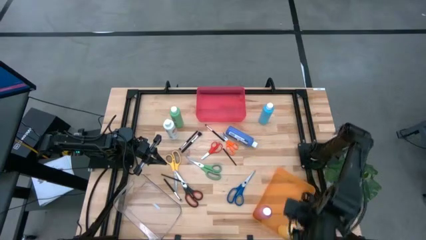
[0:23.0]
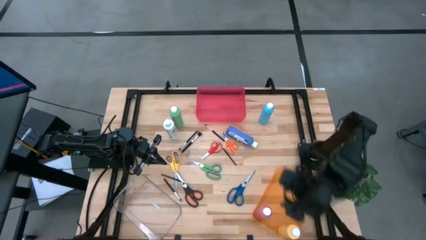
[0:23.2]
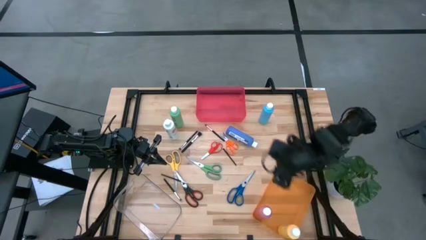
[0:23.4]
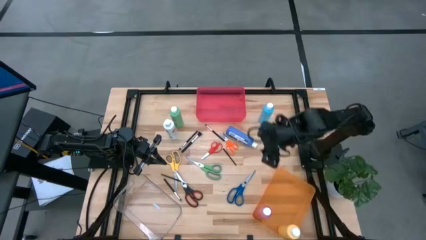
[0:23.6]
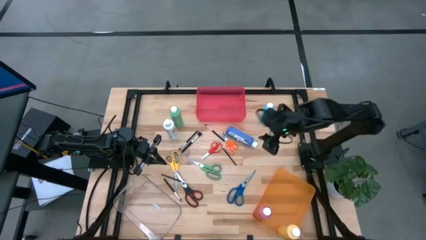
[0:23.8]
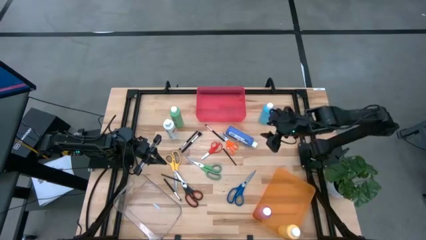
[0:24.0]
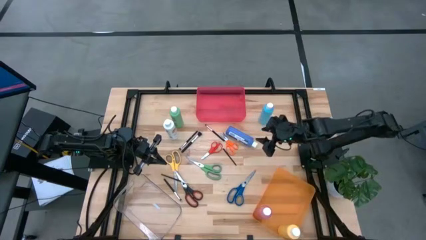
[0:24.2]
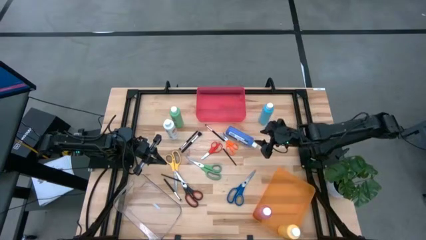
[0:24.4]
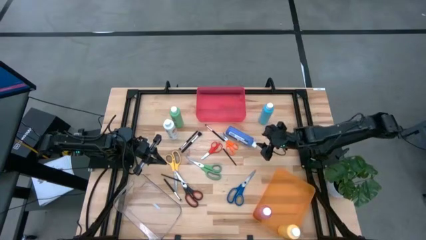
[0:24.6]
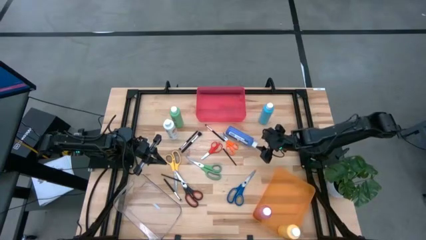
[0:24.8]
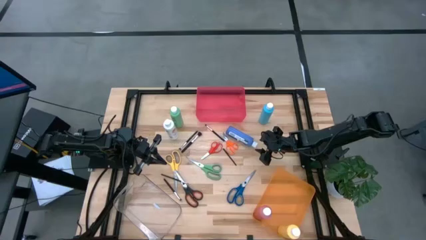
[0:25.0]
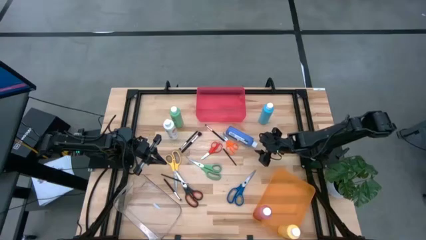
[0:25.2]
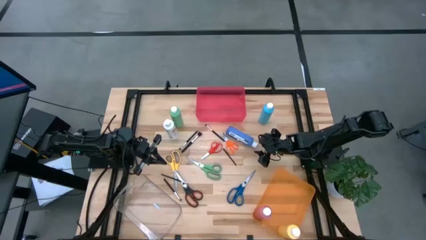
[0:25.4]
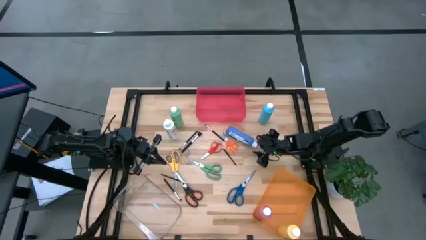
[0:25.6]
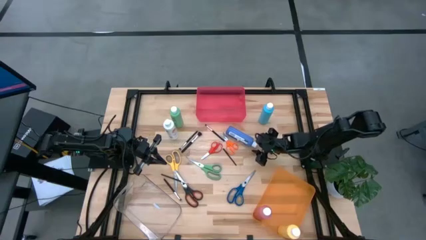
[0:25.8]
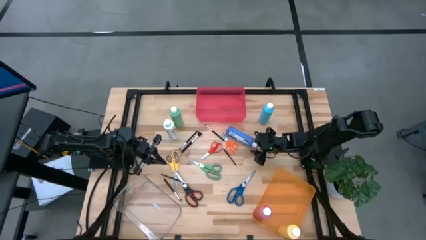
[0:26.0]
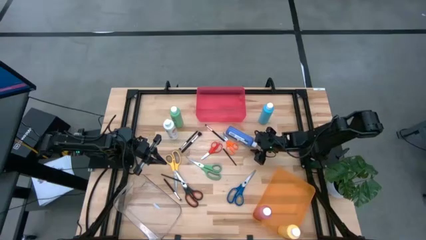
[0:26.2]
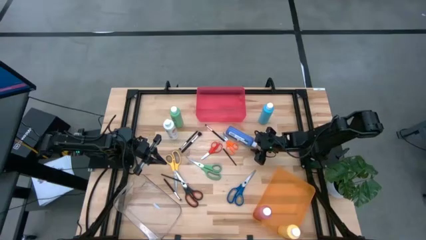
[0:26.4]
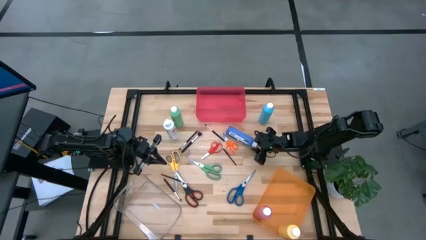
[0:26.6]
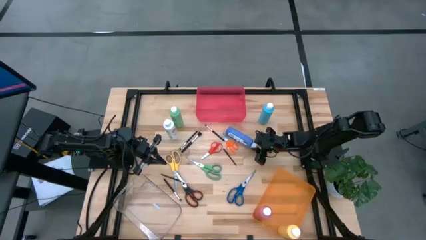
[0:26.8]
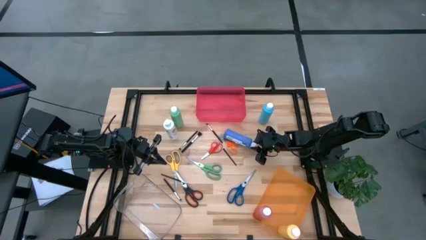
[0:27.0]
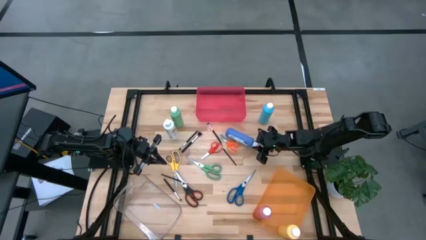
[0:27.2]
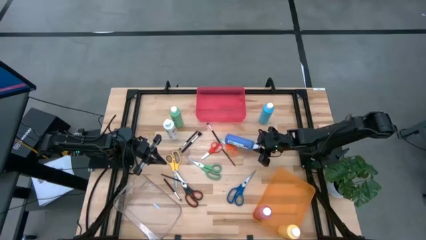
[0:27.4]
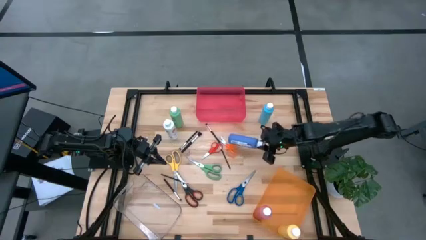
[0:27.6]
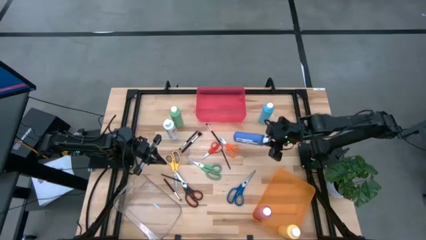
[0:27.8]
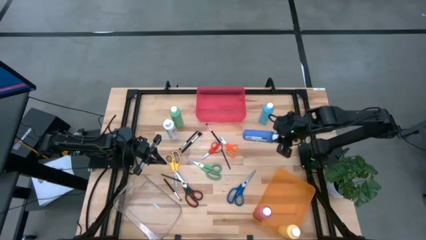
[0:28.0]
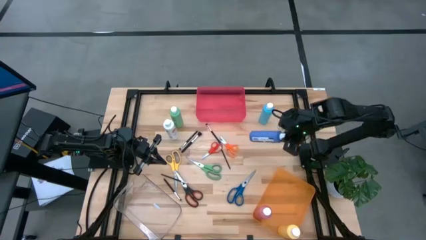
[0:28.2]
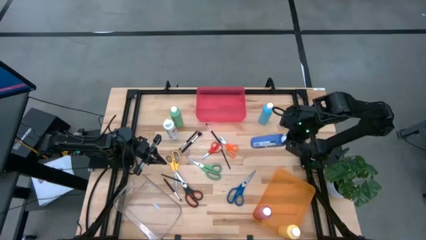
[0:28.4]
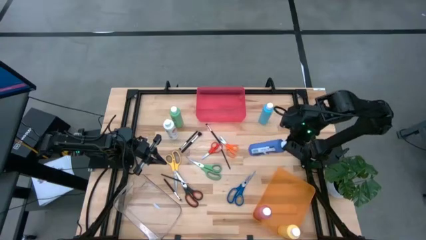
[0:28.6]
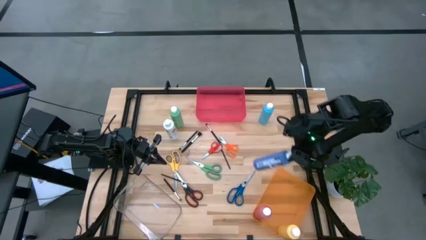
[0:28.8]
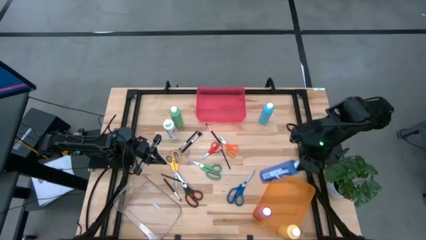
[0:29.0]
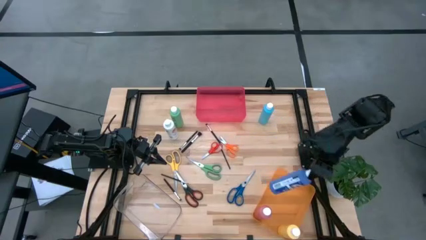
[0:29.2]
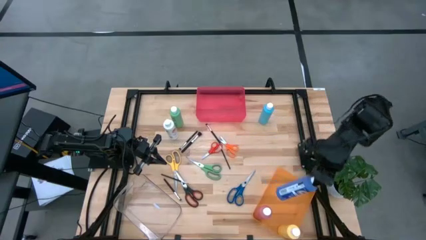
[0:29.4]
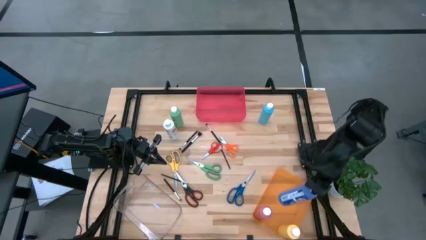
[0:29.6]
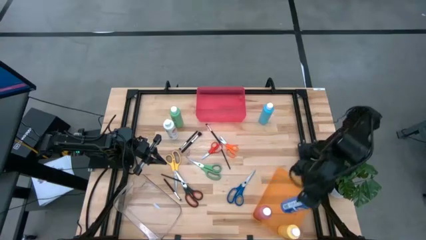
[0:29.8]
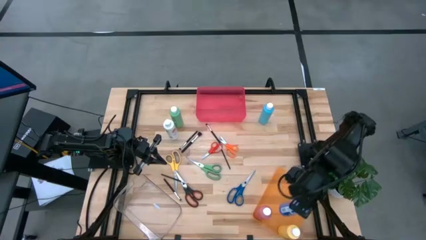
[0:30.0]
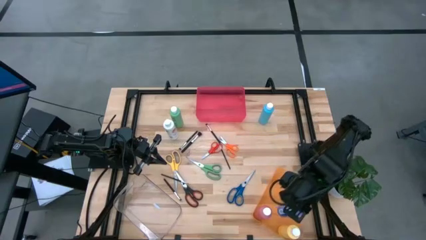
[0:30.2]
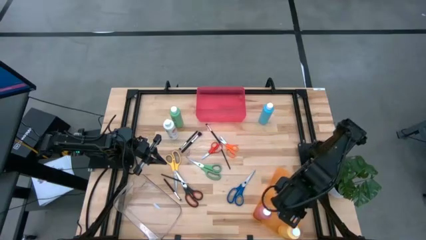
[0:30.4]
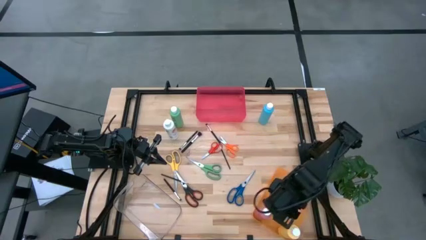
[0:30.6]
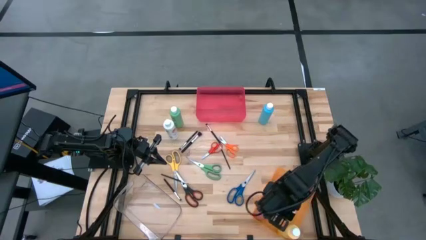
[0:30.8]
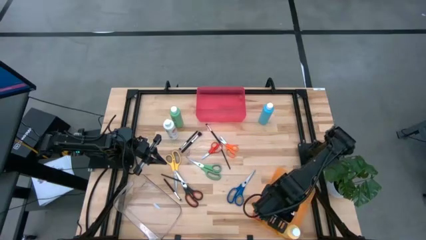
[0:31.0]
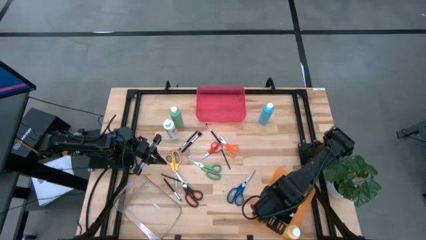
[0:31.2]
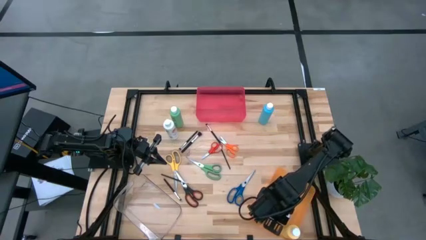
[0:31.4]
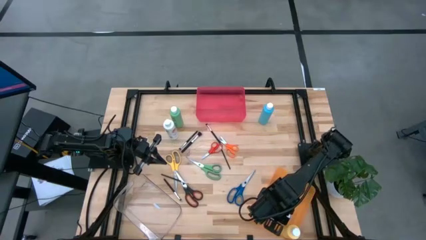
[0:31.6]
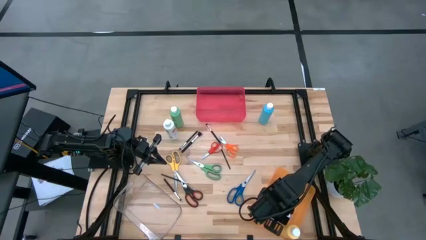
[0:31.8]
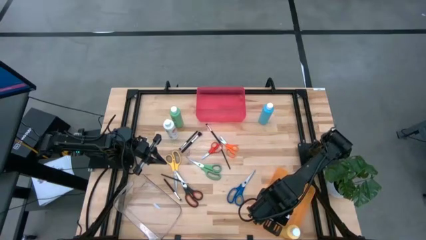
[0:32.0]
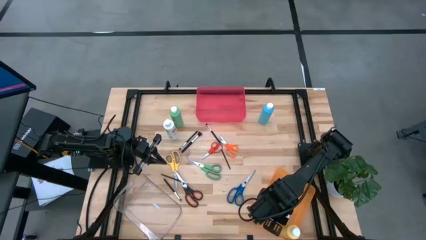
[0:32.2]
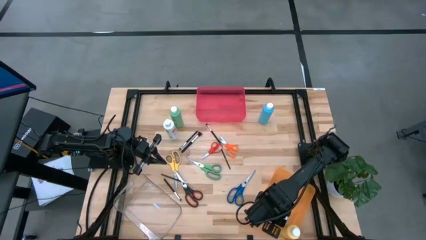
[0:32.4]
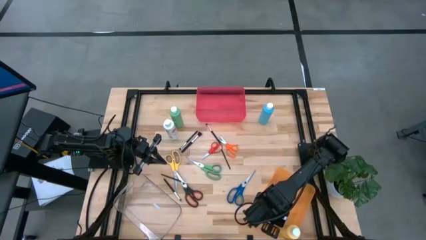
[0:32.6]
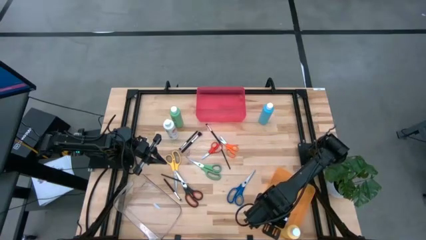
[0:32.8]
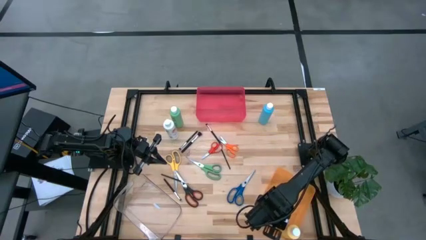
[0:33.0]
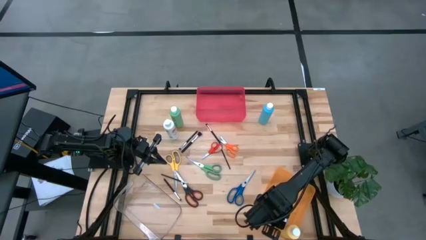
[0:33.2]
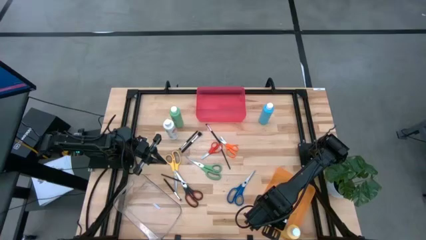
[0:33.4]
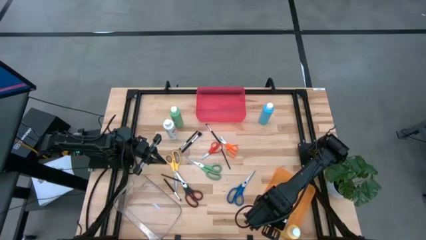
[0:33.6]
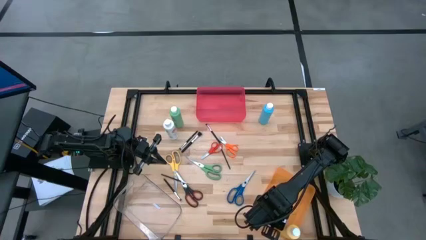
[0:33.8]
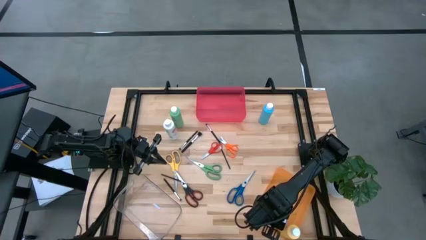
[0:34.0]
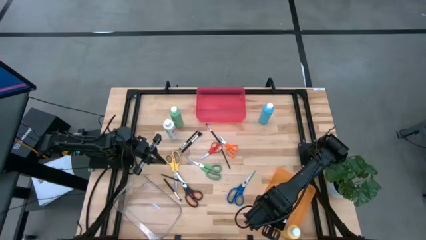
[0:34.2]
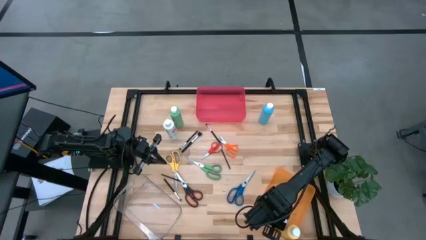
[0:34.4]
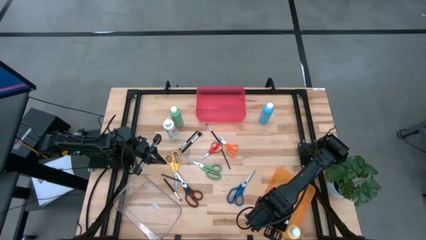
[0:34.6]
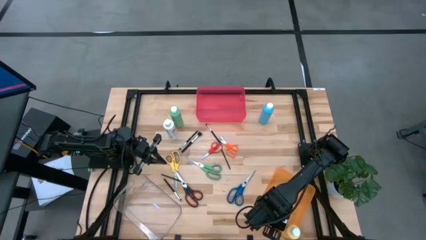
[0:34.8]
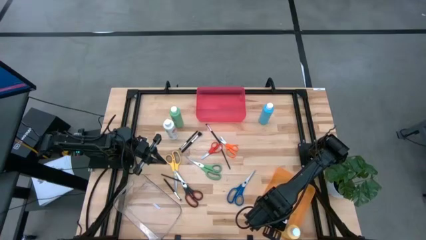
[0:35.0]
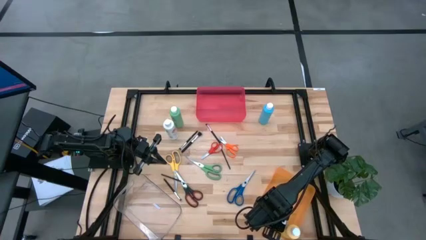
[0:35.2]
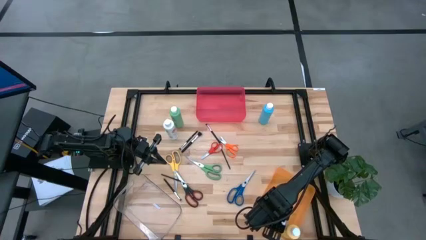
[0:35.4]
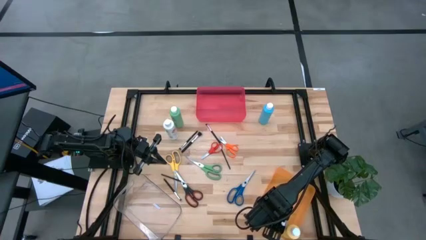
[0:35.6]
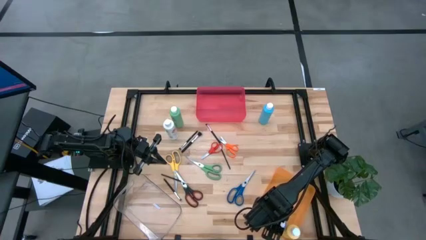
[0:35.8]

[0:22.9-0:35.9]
Task: Pick & Place Paint Supplies
Put the blue paint bottle into the orange bin

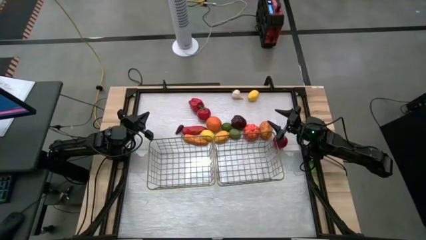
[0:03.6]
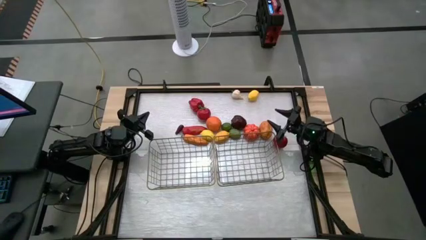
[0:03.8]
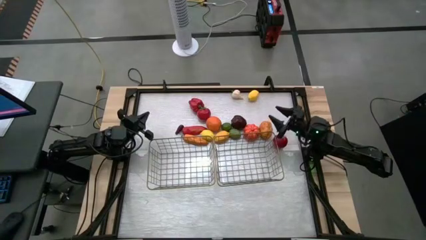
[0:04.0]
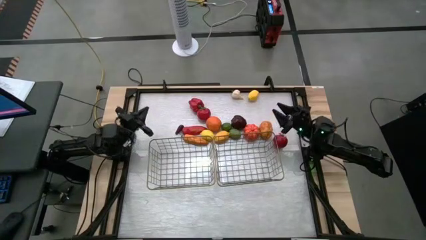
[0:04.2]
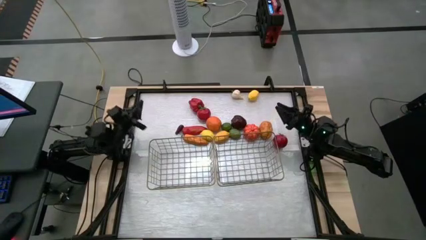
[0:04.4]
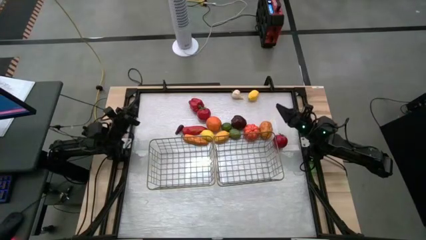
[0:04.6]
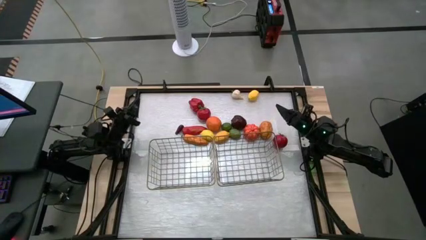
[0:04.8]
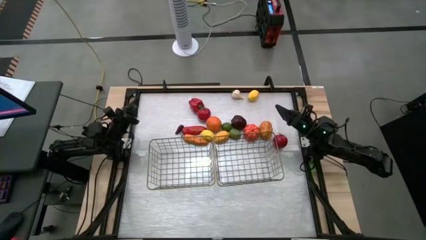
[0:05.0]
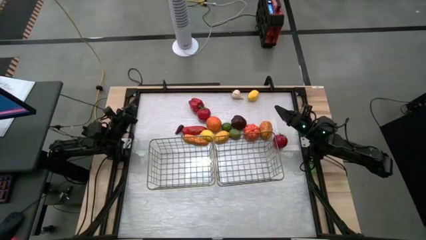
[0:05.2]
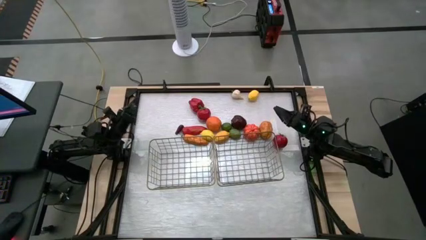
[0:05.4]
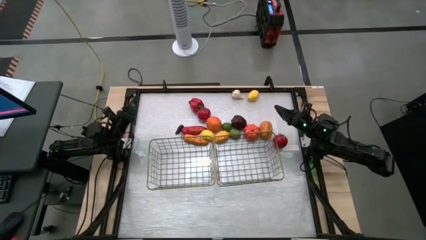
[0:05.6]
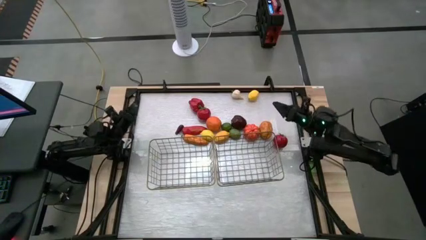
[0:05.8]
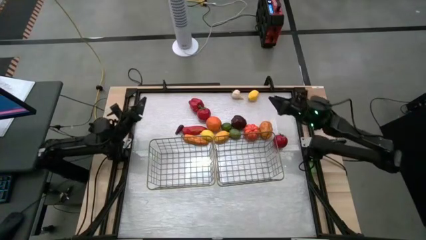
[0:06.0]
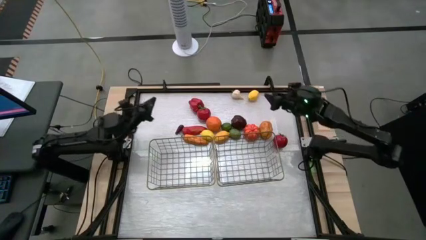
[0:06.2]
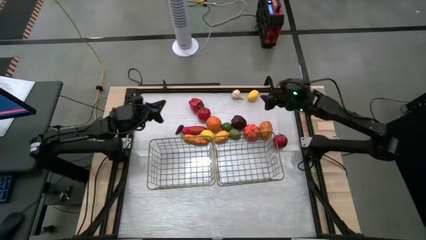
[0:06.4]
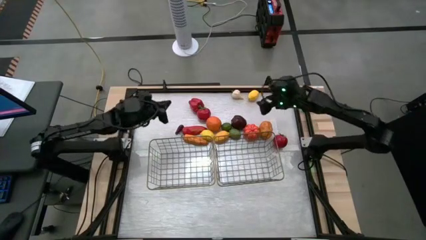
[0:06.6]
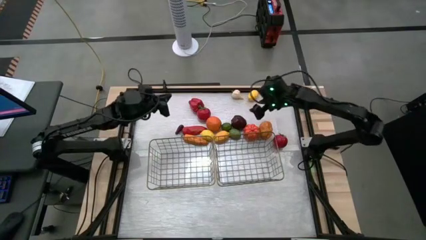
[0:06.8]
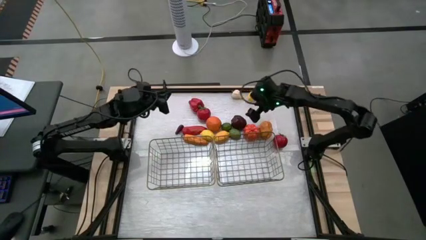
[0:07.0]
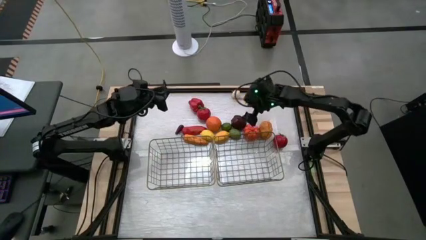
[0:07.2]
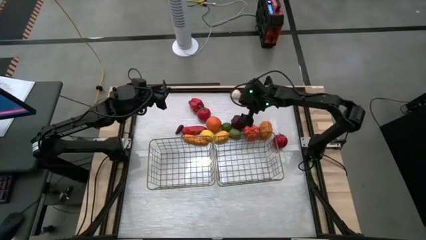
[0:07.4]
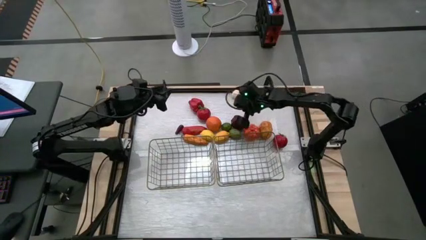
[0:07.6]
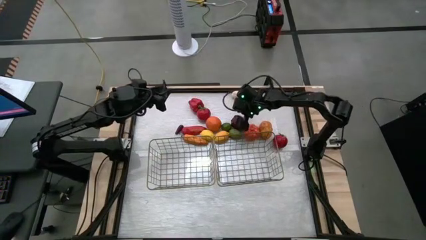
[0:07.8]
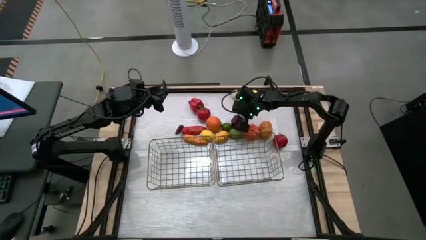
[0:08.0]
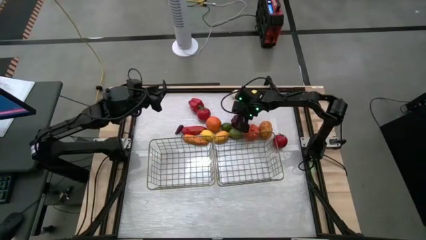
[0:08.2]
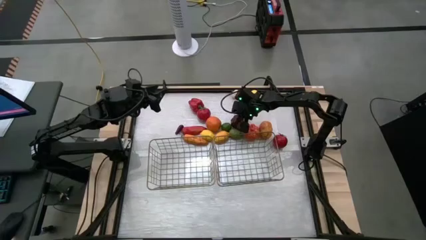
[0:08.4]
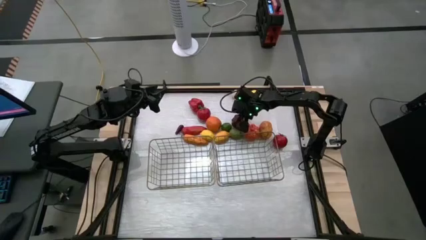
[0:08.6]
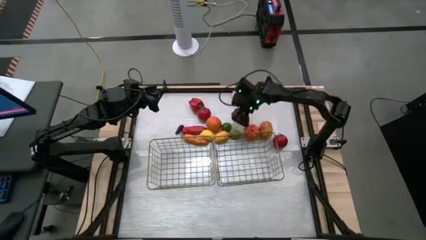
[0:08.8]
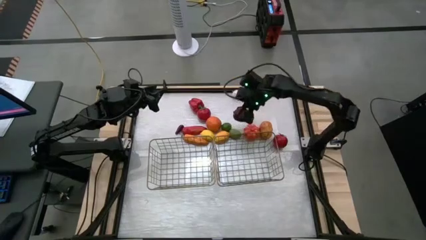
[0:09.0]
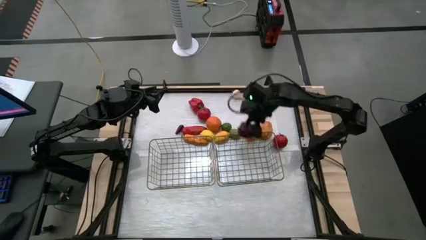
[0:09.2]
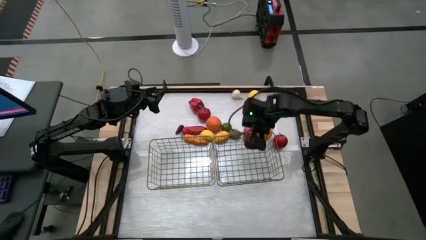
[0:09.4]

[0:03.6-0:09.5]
Task: Sort produce into baskets
Put the apple into the right wire basket
